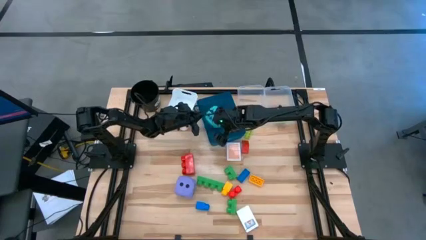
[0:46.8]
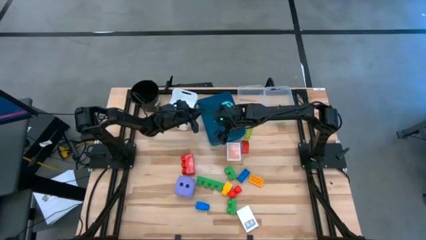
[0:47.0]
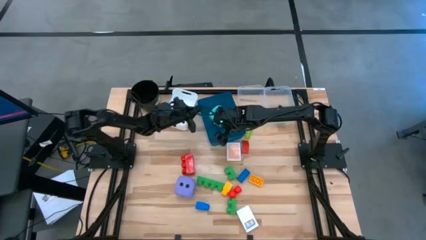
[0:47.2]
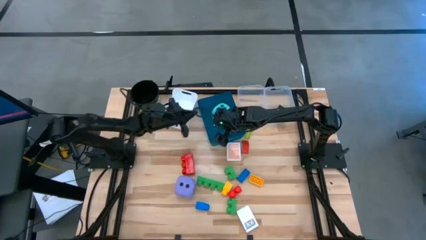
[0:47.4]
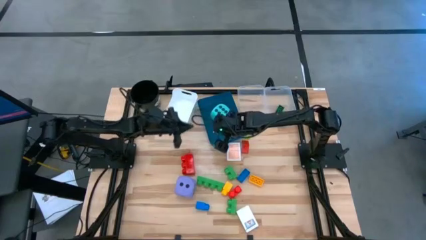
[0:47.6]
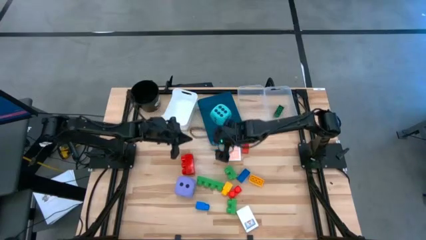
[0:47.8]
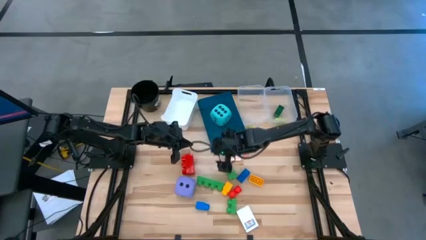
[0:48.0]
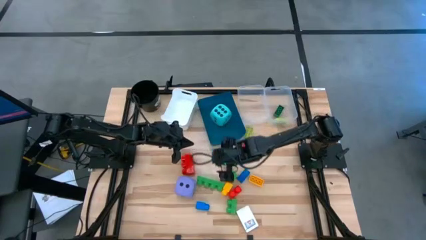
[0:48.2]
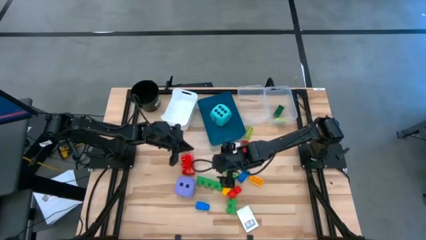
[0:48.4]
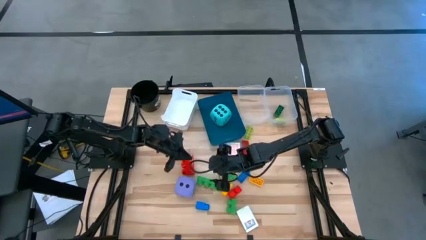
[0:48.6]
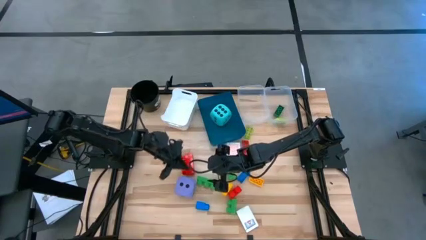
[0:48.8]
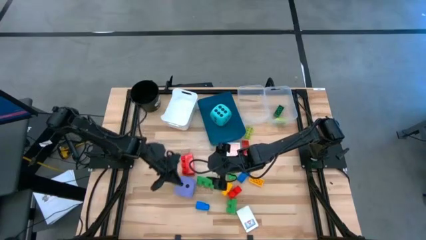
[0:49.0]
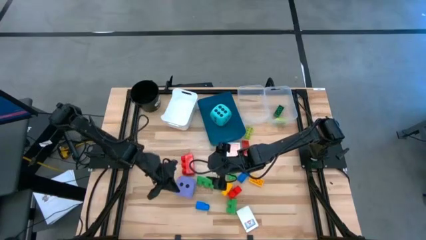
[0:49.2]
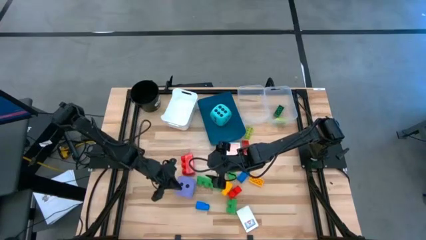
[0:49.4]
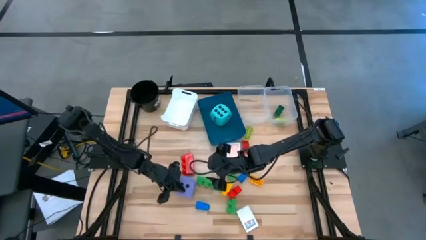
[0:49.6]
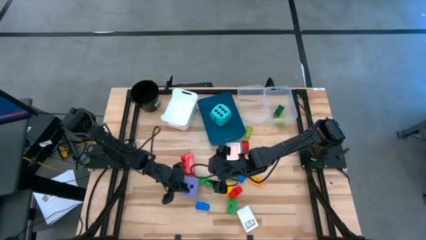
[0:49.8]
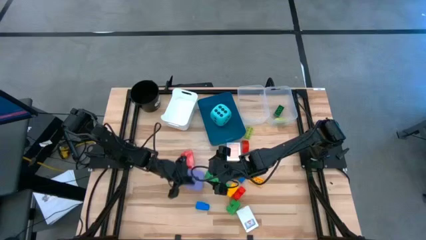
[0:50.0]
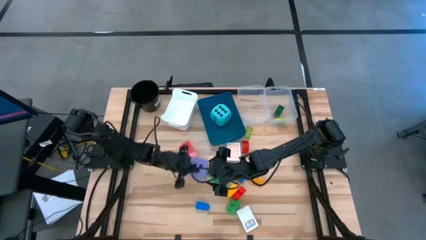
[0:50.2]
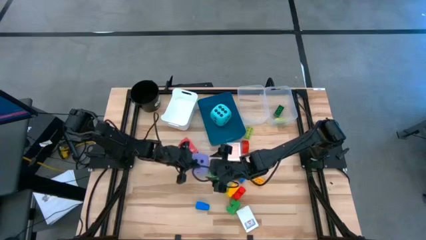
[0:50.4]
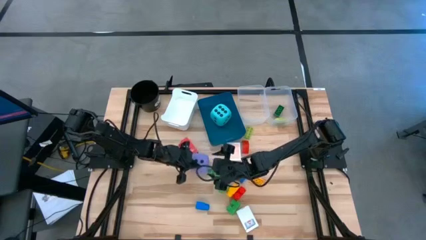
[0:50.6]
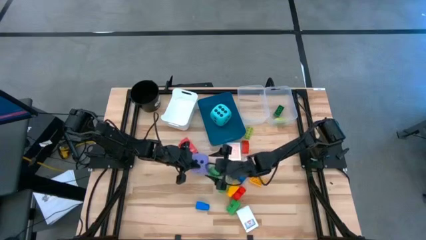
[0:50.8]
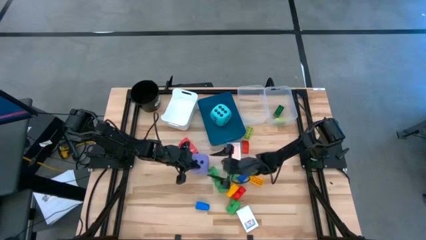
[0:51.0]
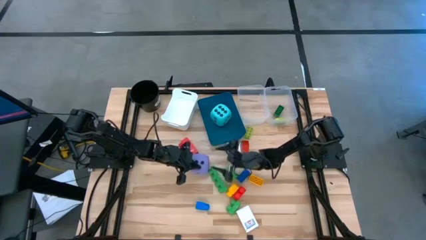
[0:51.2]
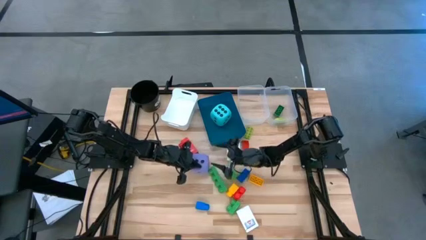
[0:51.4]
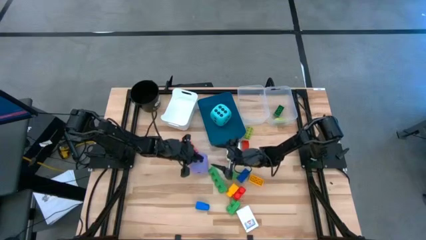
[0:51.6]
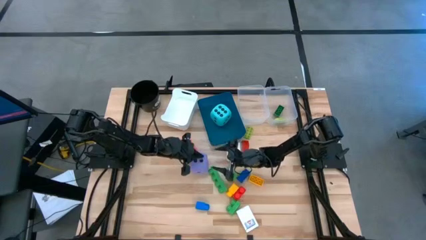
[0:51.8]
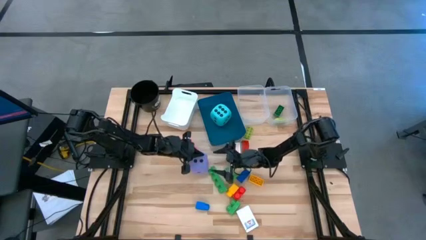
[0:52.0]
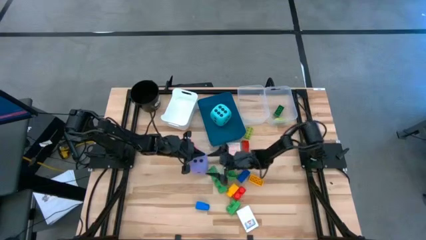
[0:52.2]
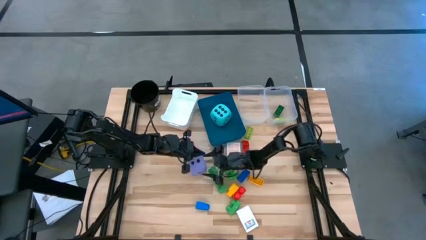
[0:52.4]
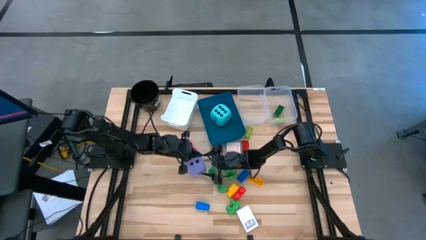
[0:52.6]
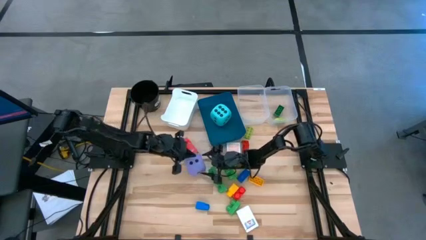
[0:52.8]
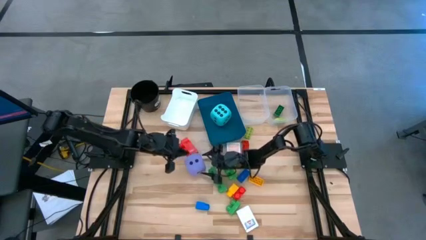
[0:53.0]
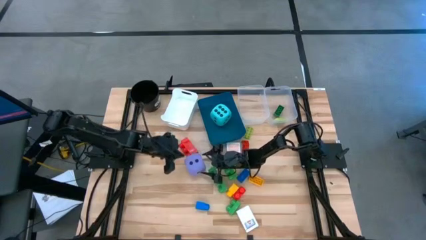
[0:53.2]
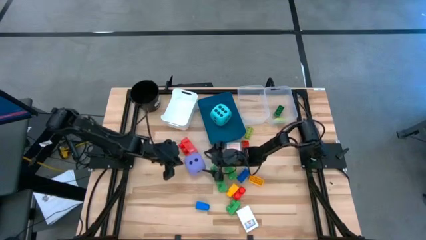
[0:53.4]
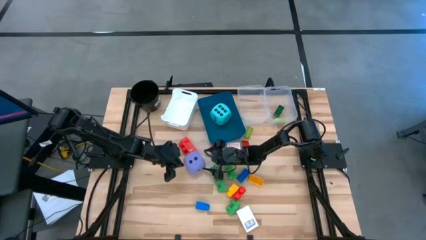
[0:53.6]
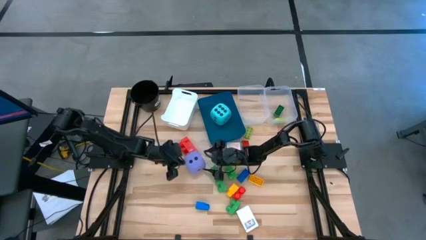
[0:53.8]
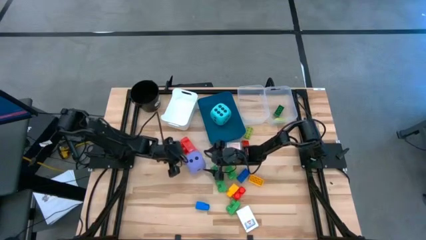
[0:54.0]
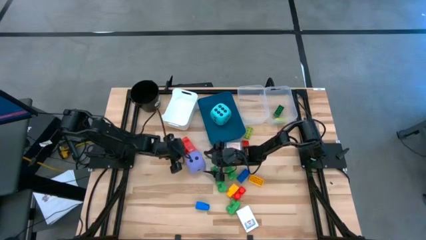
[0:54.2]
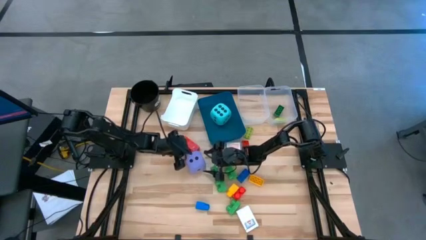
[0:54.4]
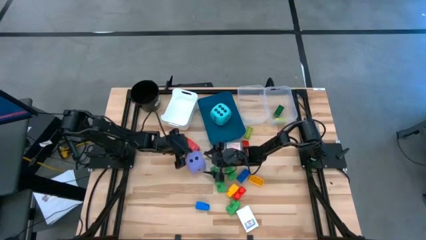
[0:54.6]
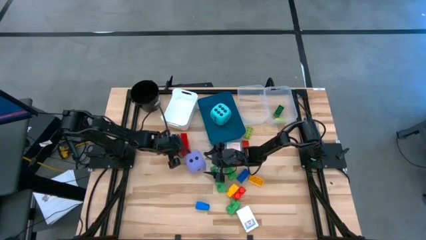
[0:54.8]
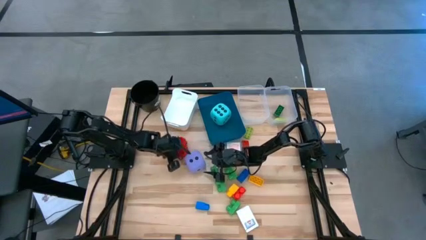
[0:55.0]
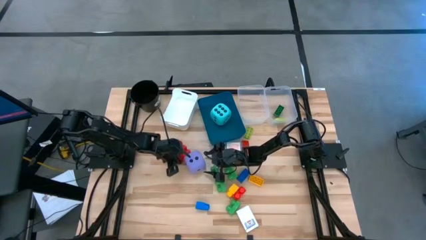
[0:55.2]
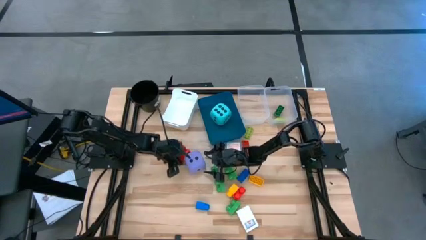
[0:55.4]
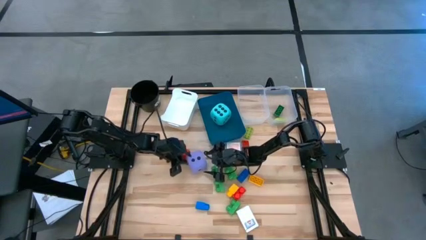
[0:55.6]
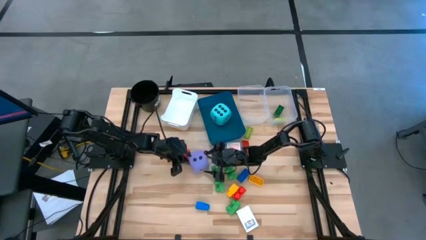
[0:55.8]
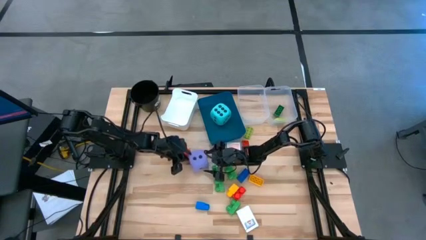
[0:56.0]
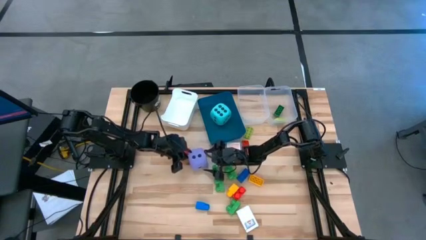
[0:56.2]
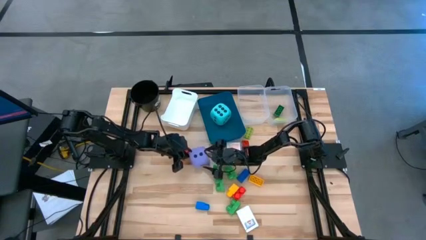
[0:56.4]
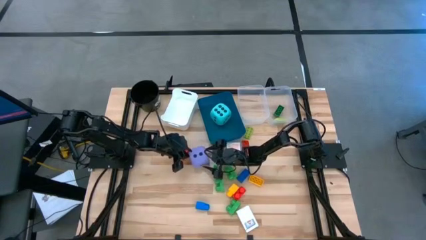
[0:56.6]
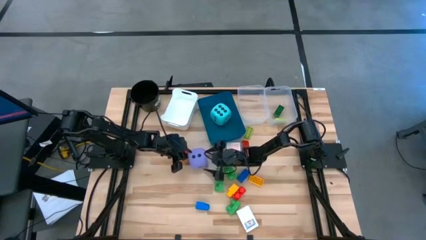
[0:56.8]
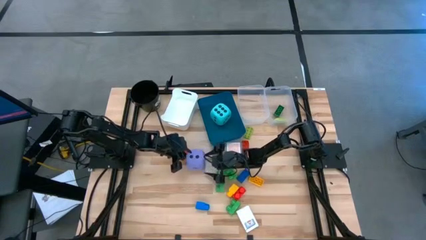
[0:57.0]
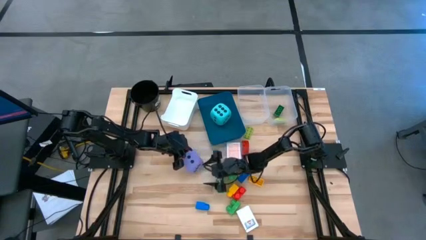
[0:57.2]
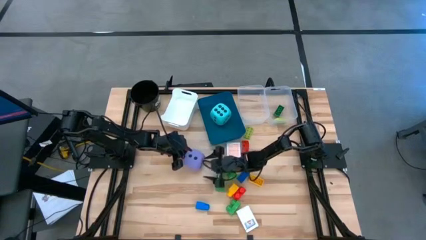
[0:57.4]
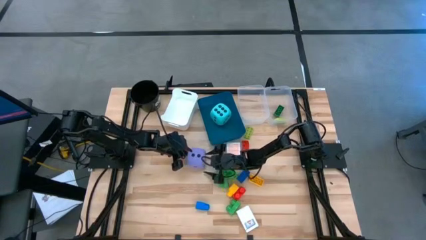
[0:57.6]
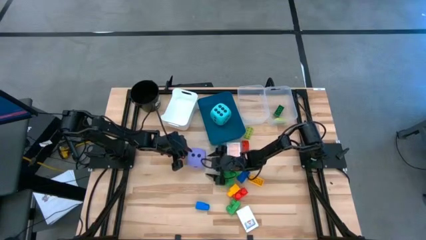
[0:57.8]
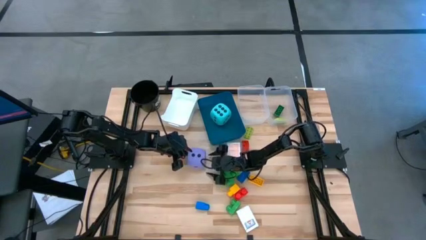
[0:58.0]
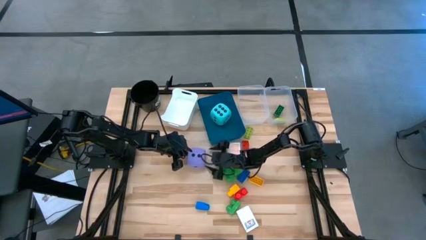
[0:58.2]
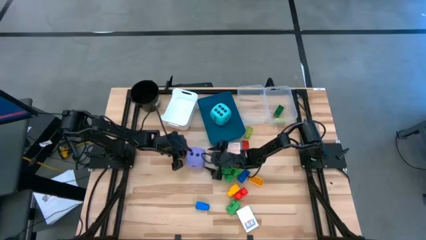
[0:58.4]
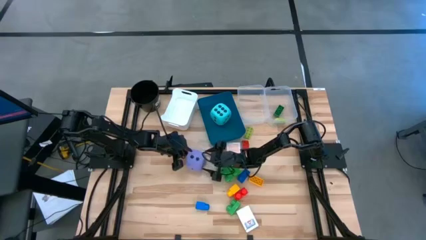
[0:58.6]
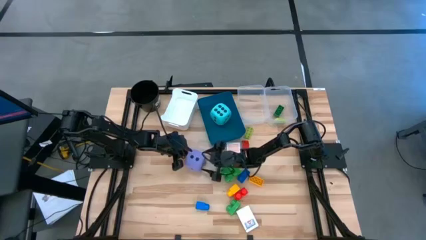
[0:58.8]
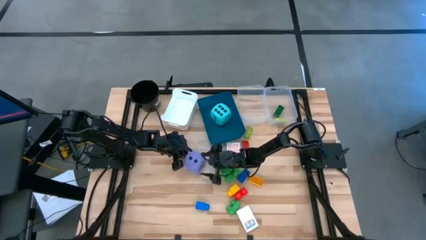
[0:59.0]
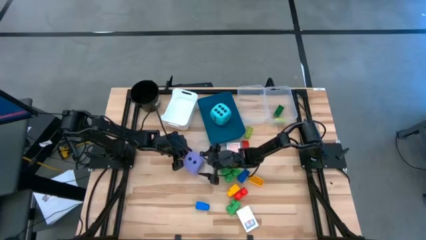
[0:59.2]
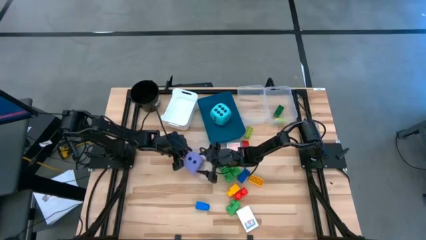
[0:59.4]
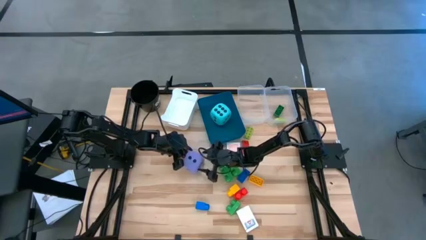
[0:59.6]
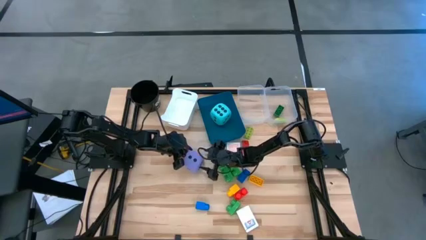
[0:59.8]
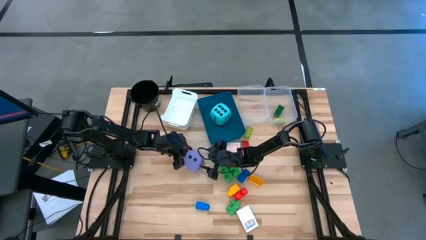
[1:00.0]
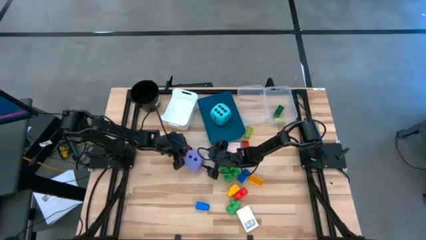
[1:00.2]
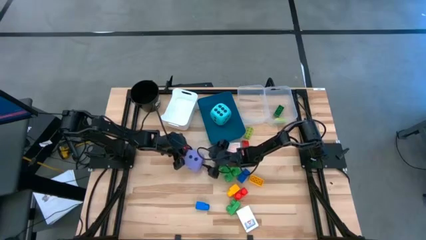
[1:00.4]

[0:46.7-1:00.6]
Task: Pick & Place Toys
Put the large purple dice into the blue bin

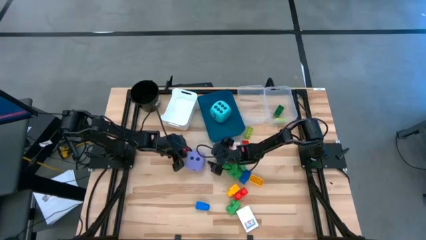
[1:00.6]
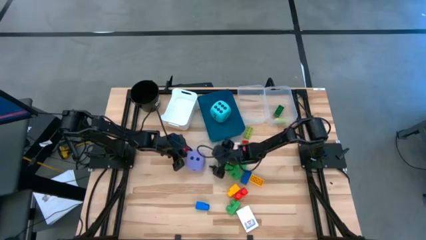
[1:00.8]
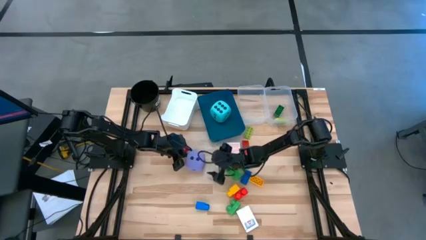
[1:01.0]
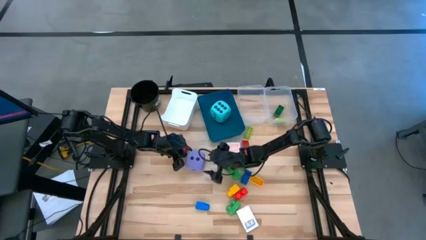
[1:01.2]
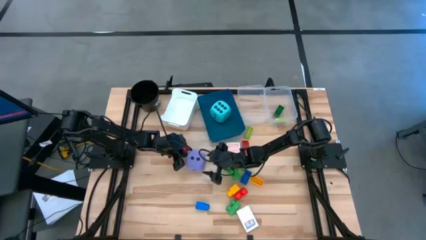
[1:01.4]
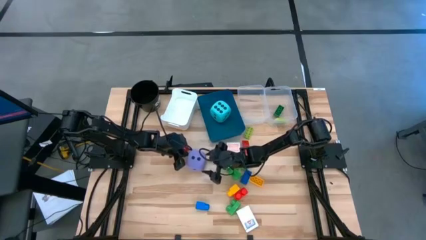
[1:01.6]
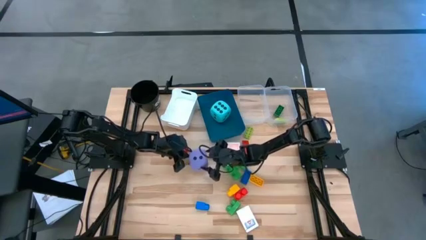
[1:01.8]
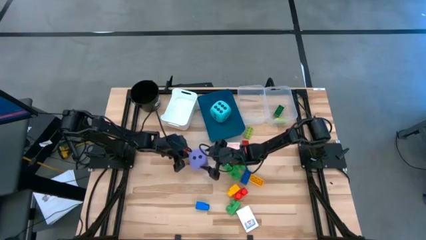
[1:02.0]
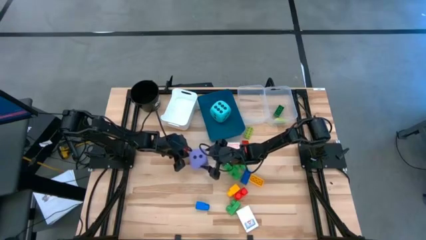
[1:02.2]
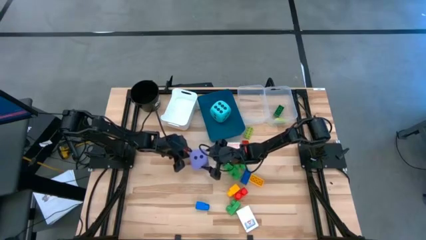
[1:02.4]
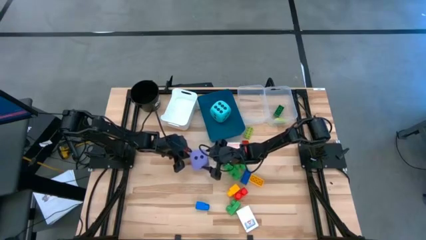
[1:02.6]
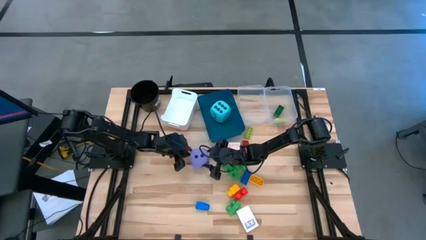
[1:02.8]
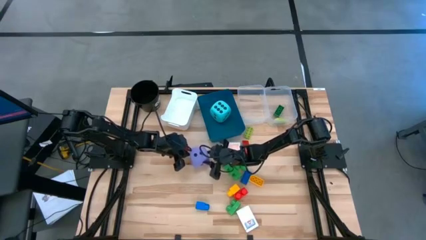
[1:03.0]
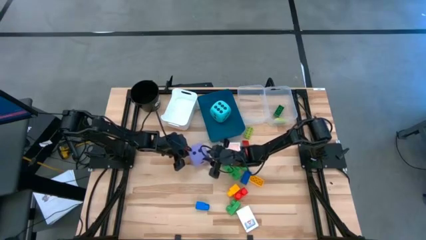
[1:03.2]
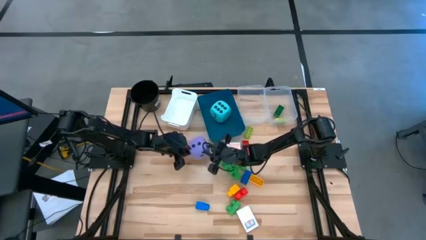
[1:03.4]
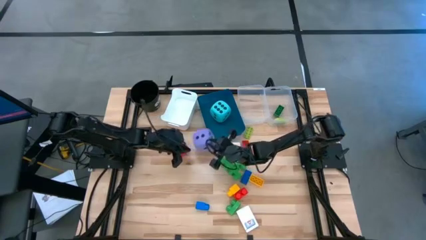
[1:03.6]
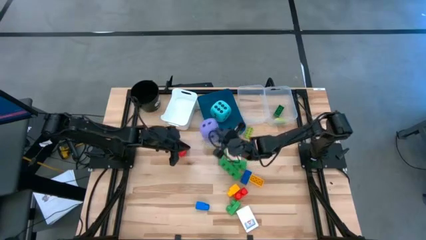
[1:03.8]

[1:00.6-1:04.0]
Put the large purple dice into the blue bin
